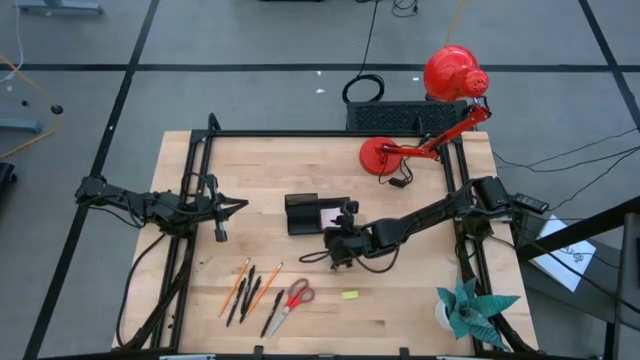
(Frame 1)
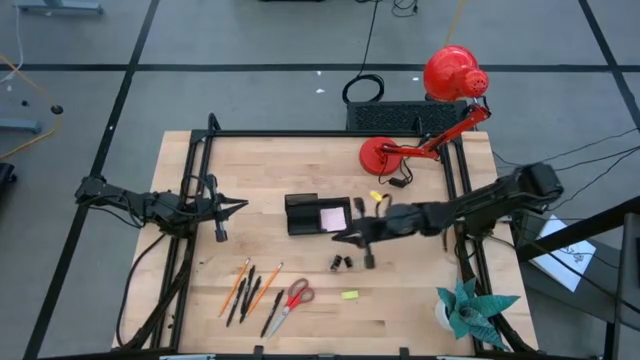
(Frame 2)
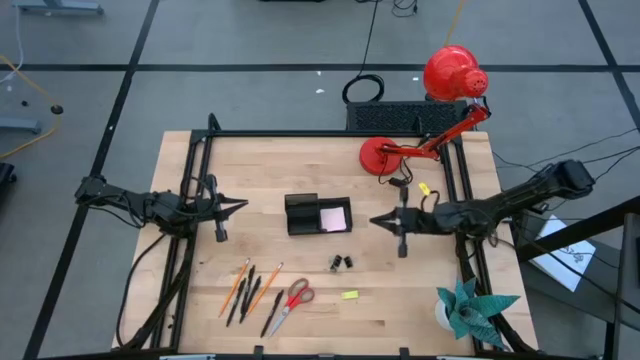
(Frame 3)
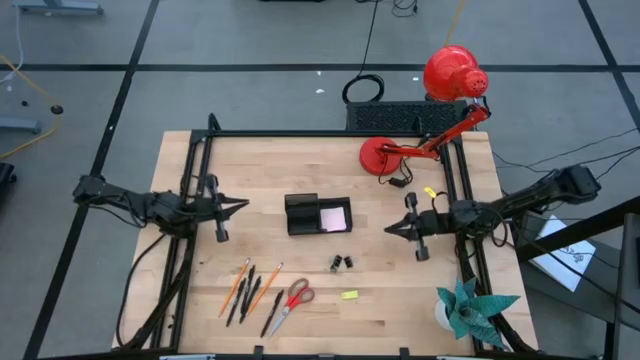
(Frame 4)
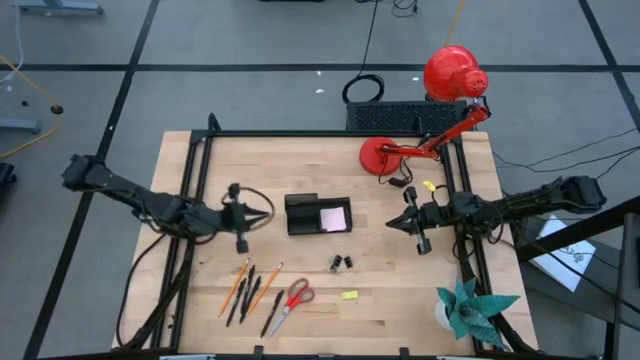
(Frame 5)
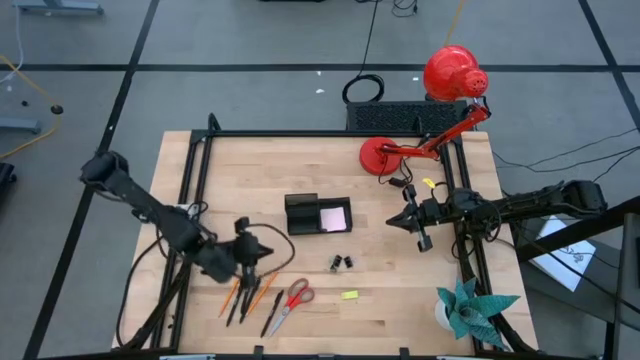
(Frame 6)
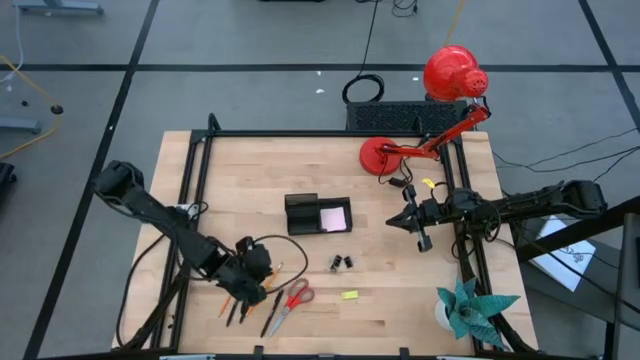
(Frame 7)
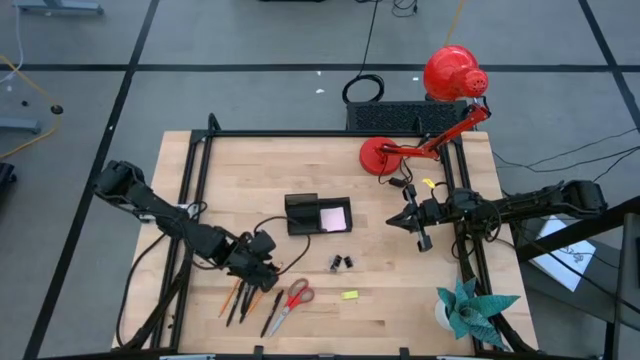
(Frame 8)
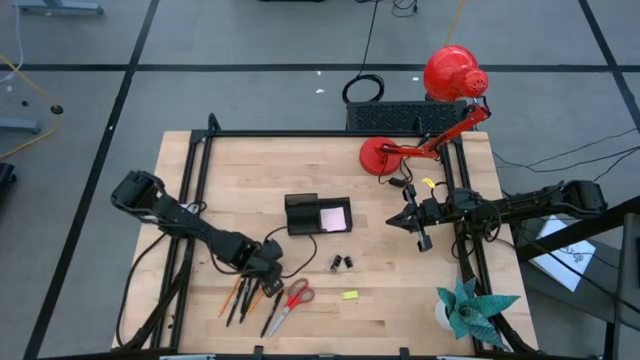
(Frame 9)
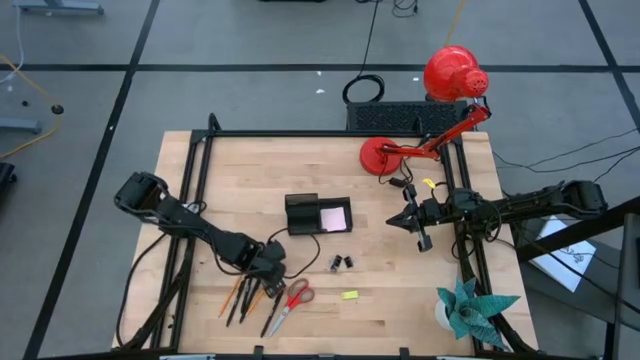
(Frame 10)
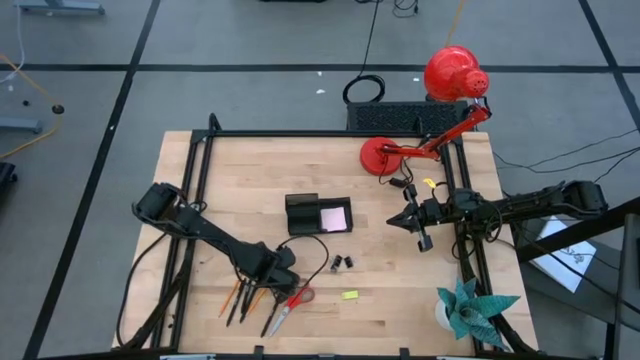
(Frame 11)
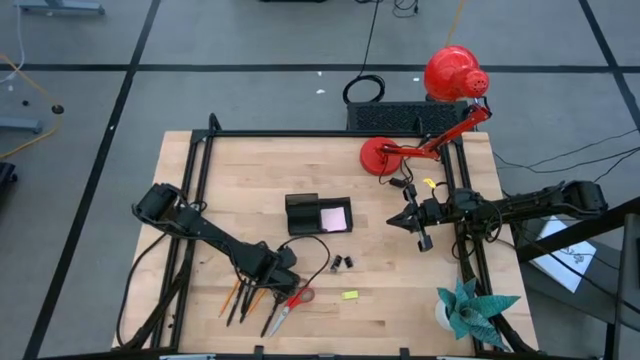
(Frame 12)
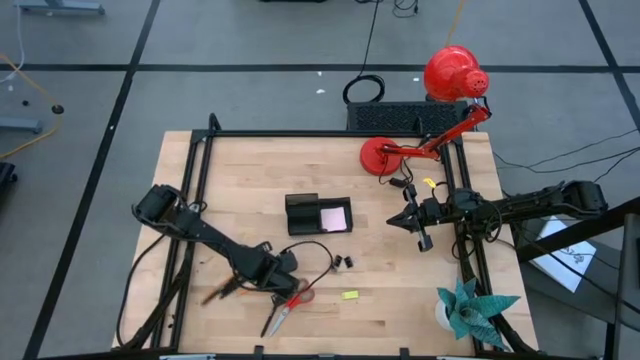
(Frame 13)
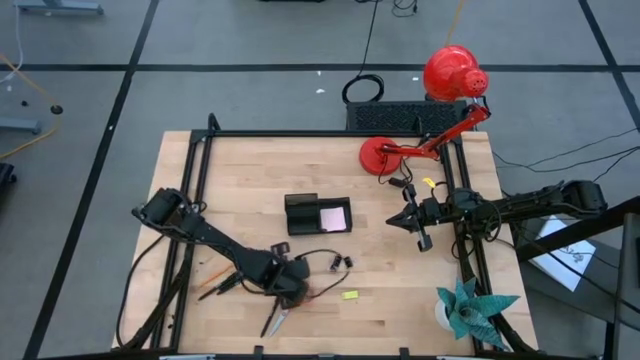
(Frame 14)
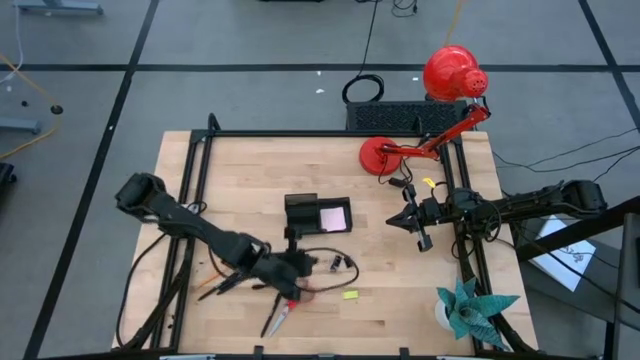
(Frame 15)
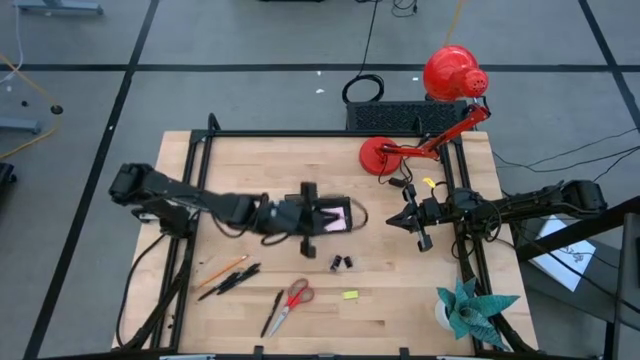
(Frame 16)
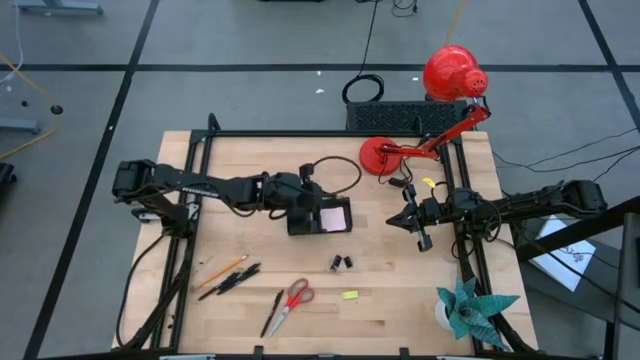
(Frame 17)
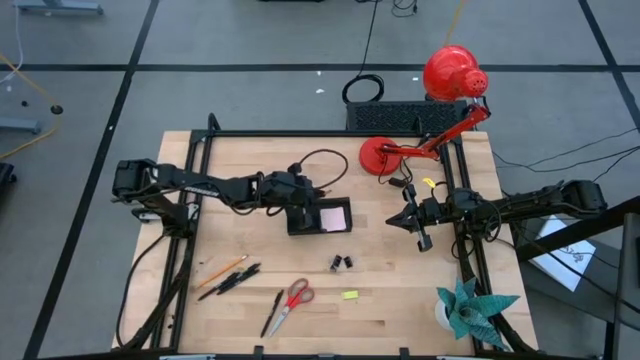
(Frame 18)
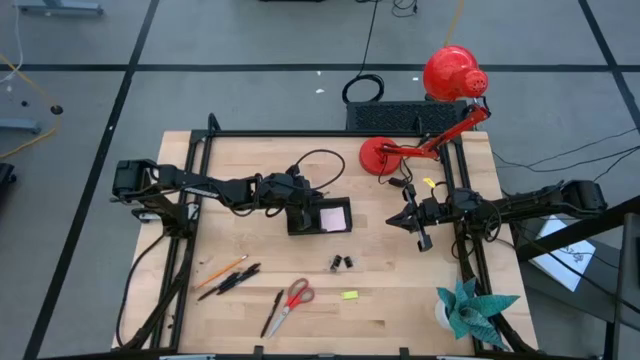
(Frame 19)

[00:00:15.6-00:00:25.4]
Task: Pick and place office supplies into organizer
Put the orange pencil into the black desk organizer

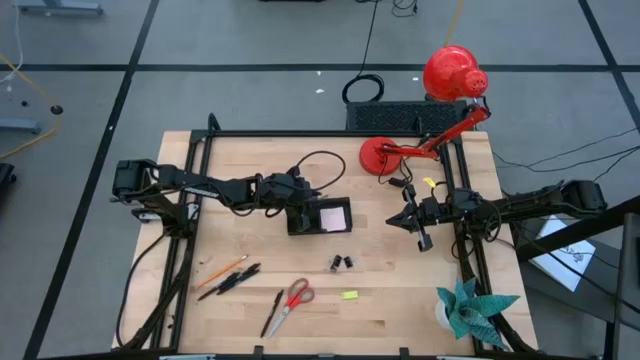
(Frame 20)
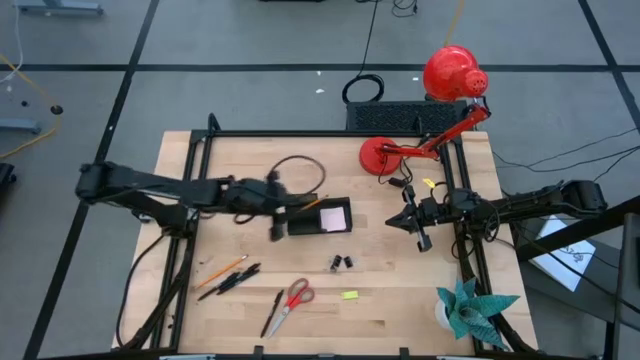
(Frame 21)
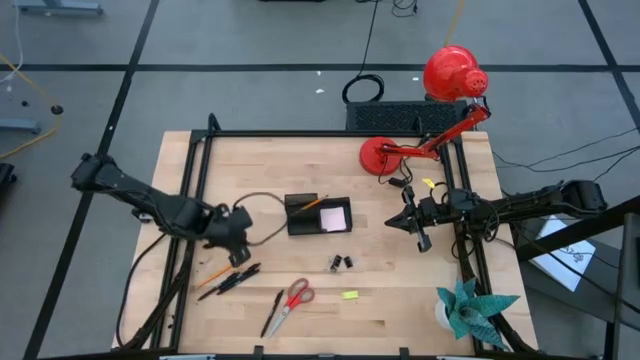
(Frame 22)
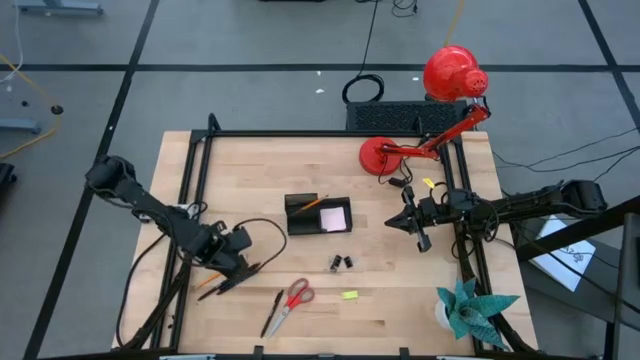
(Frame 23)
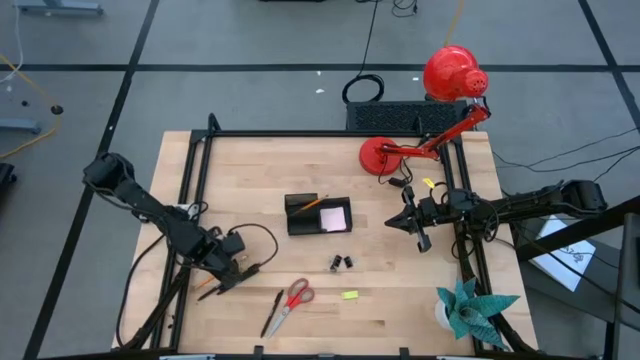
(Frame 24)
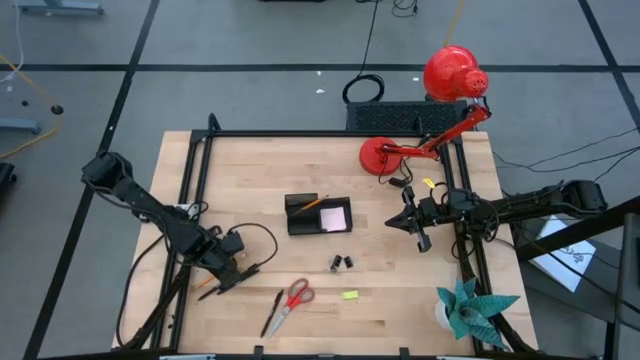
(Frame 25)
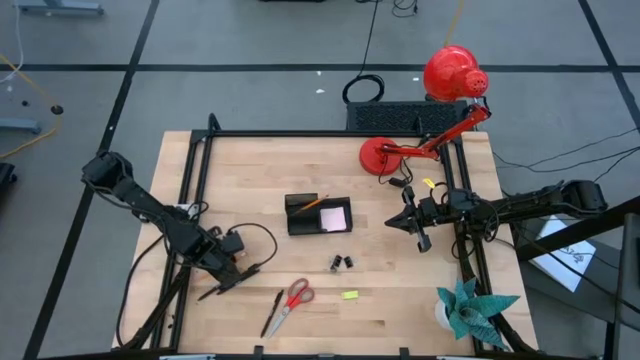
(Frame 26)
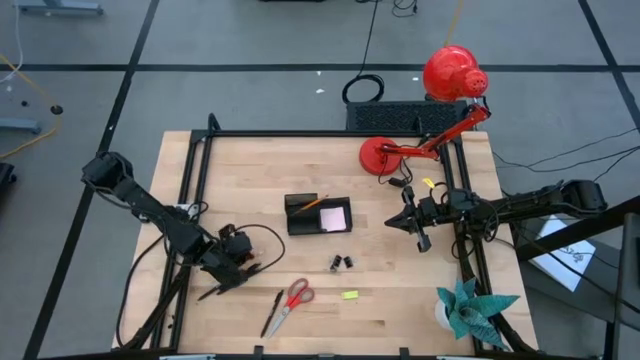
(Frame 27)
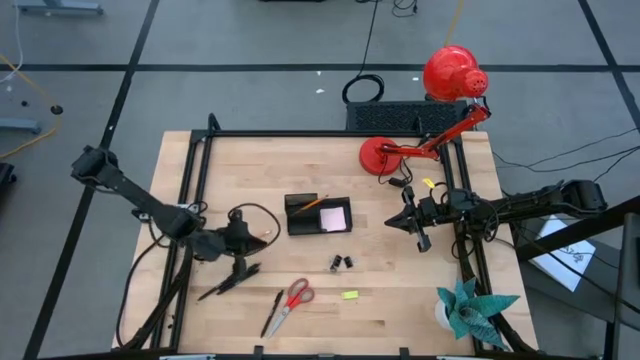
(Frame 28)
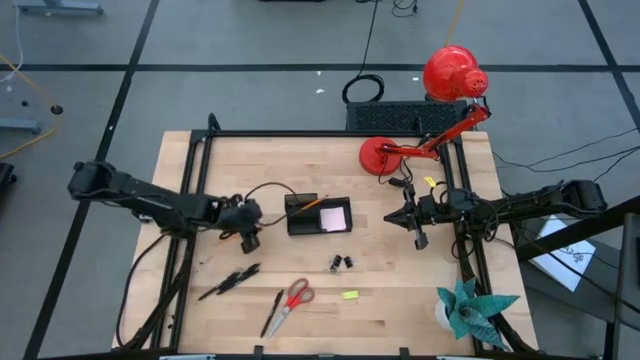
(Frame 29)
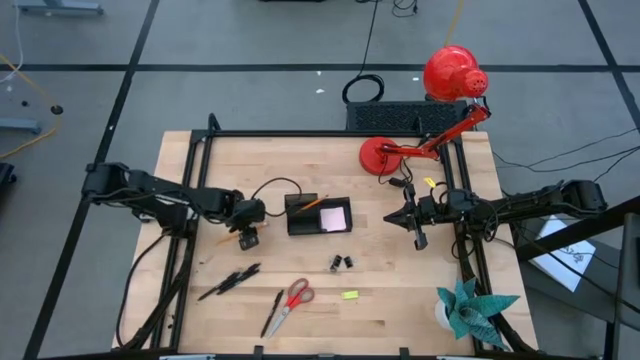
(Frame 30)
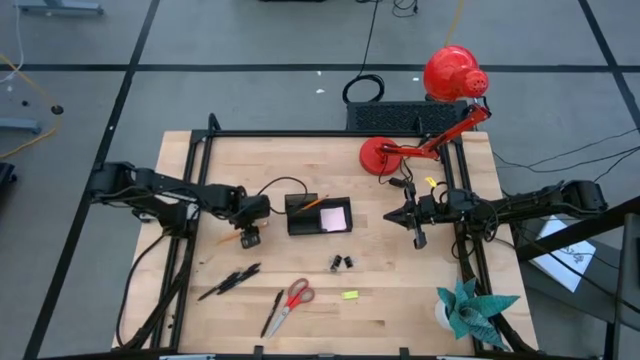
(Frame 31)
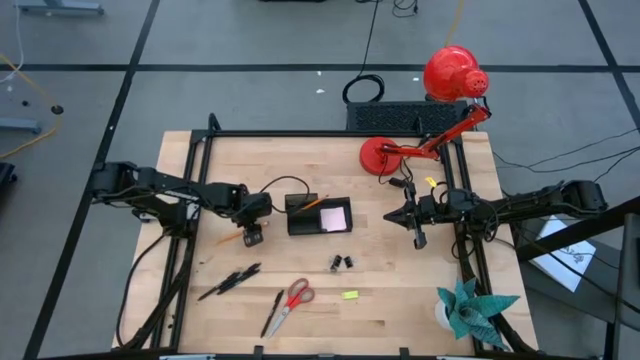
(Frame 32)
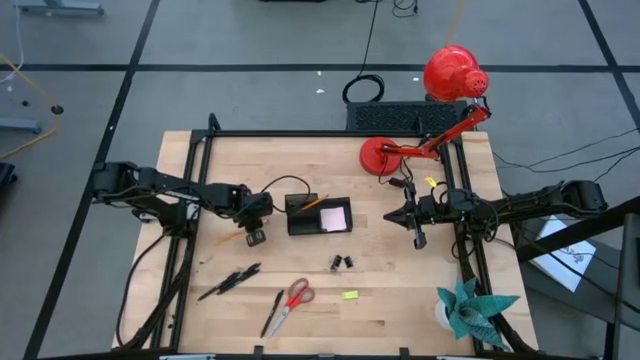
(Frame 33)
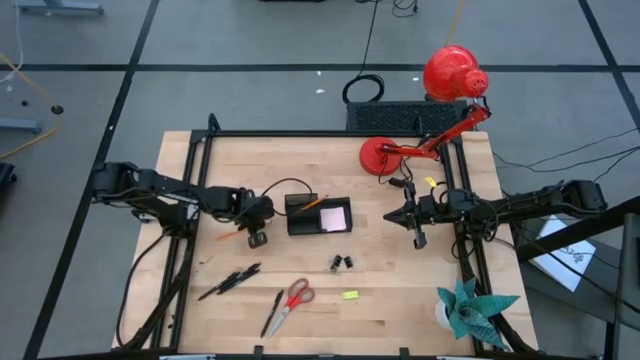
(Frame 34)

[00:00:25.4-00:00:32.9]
Put the orange pencil into the black desk organizer

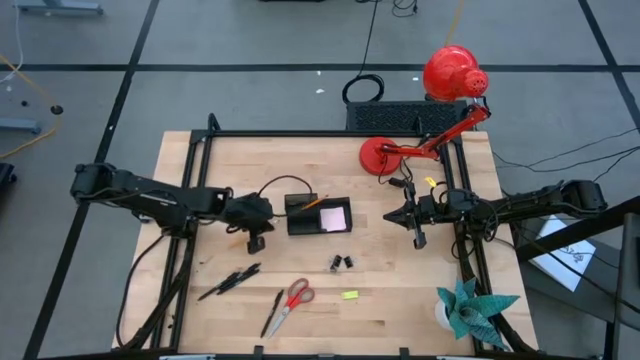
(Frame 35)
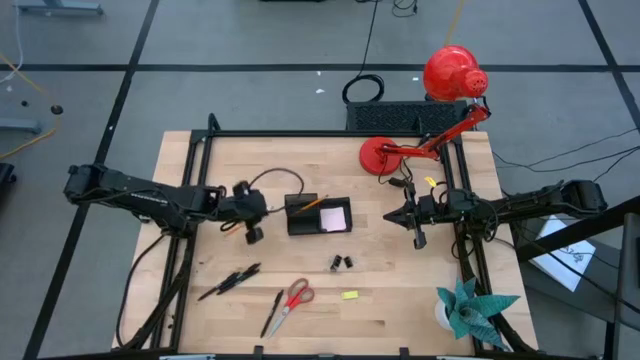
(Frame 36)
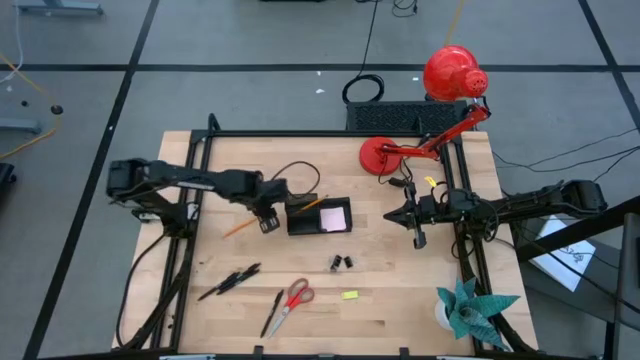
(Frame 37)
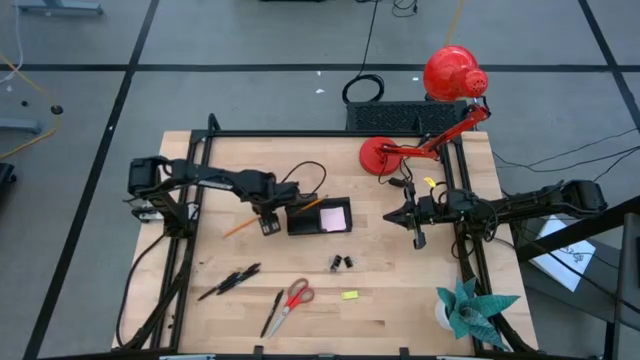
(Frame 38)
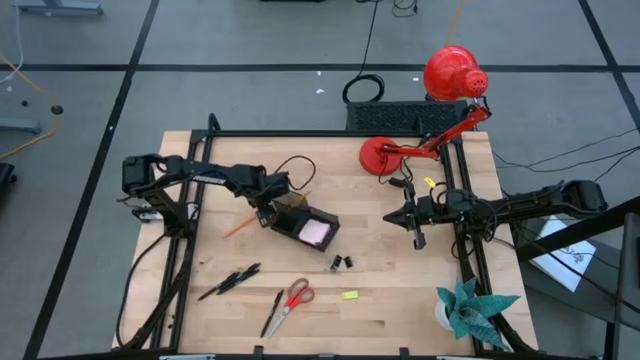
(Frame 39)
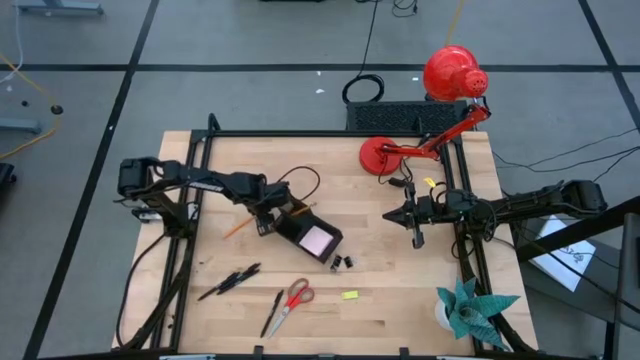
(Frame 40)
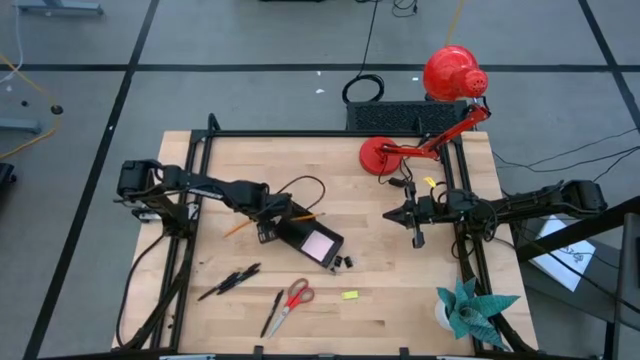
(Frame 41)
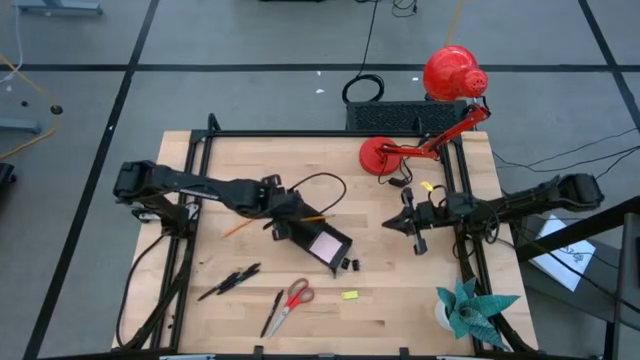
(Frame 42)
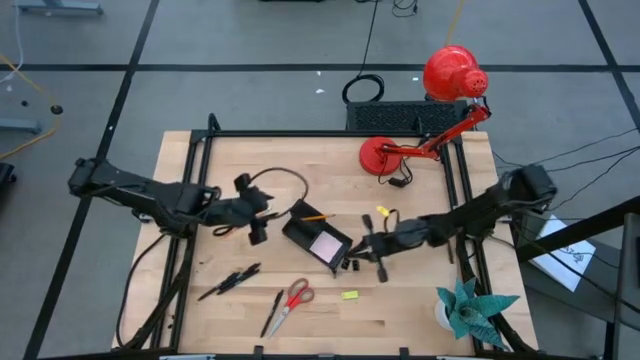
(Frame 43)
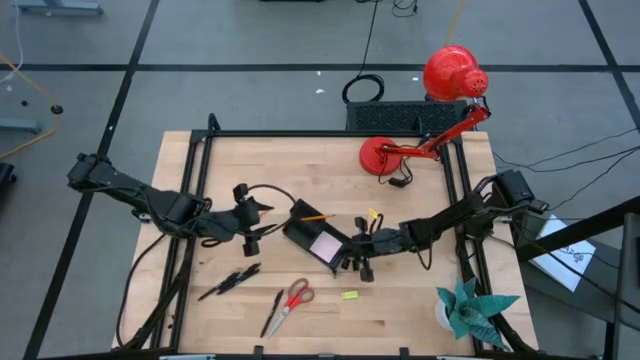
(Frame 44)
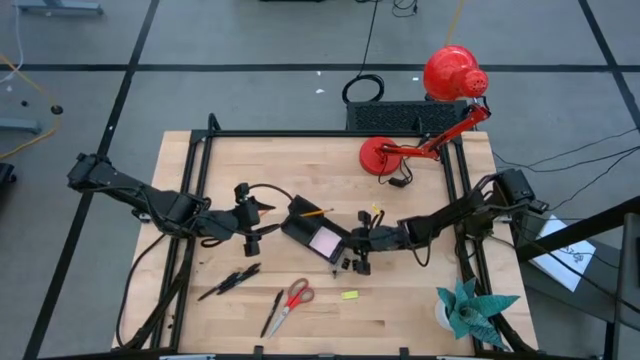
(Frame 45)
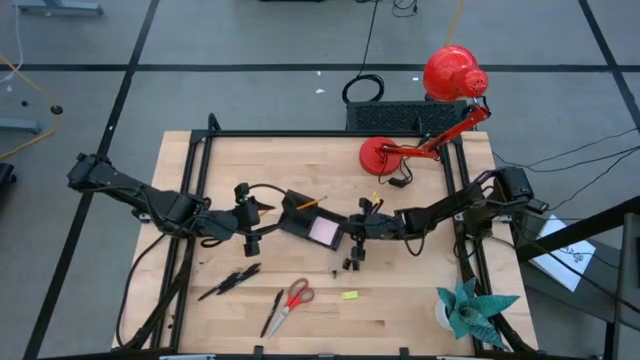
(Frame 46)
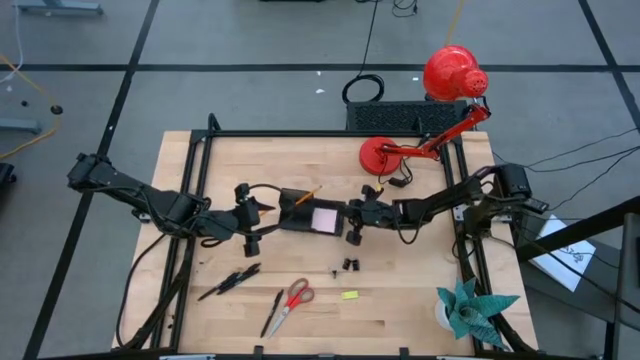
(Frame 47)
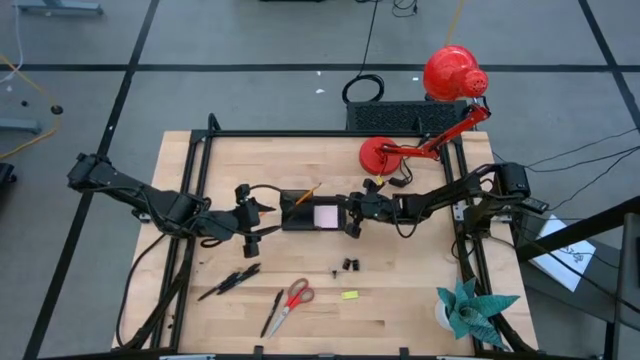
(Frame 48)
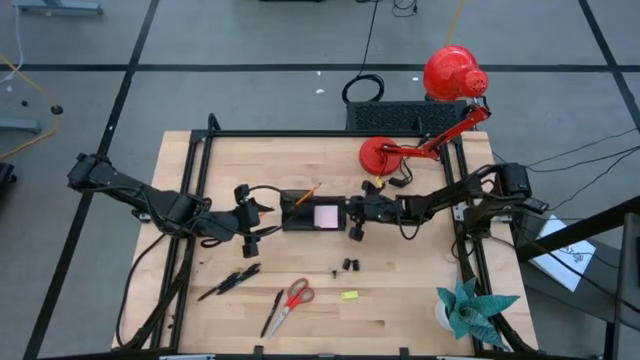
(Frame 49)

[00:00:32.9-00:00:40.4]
Adjust the black desk organizer
